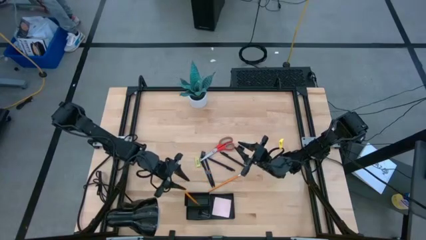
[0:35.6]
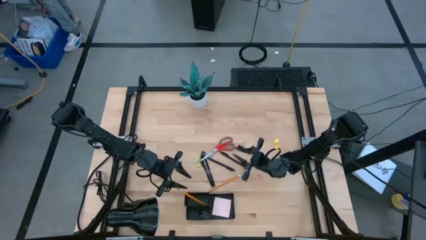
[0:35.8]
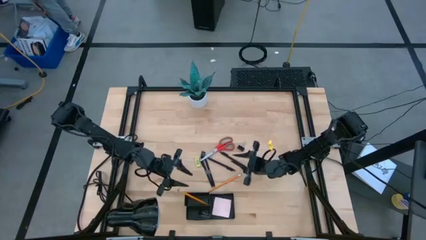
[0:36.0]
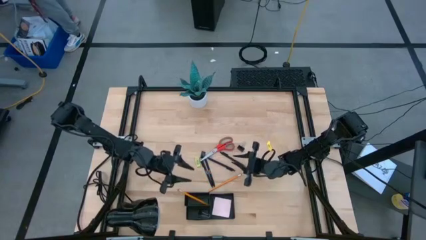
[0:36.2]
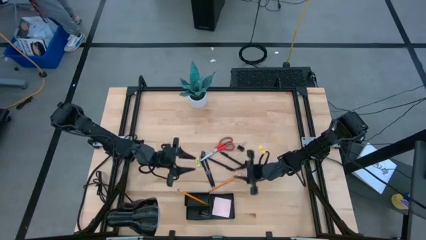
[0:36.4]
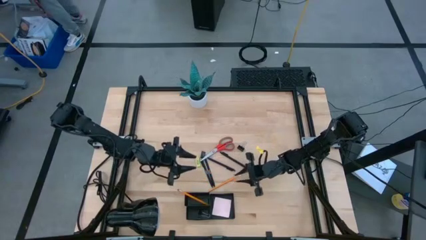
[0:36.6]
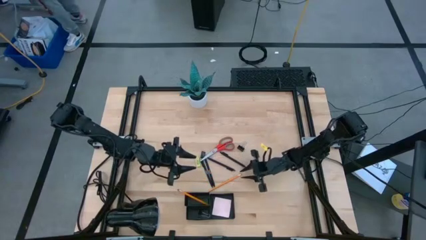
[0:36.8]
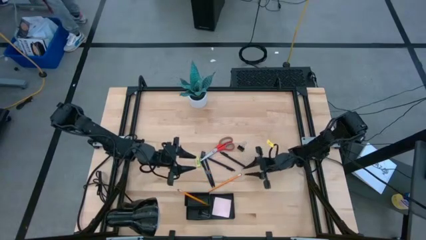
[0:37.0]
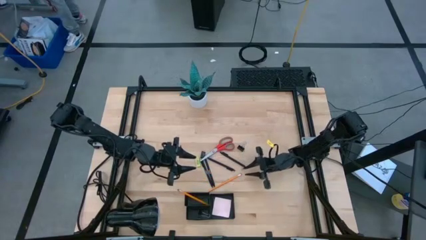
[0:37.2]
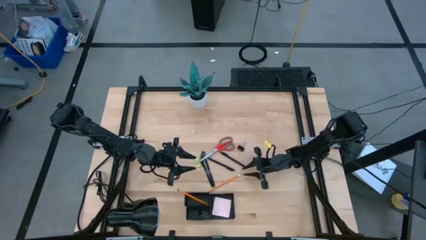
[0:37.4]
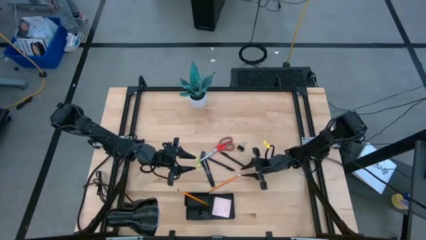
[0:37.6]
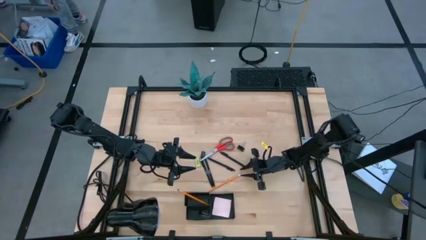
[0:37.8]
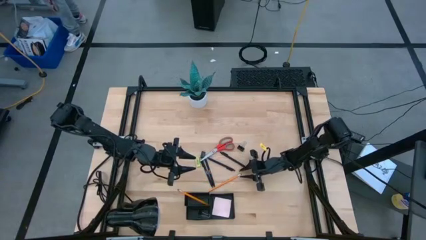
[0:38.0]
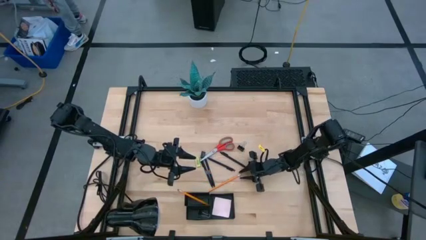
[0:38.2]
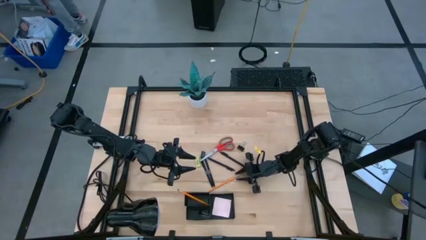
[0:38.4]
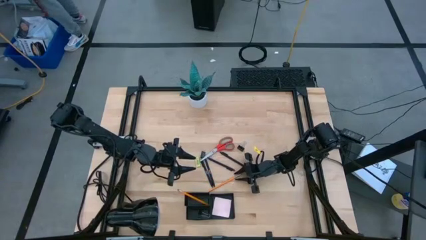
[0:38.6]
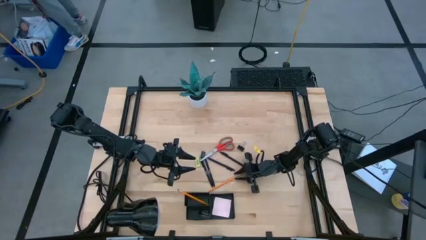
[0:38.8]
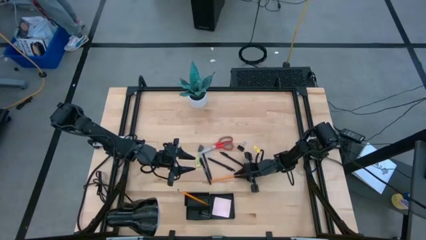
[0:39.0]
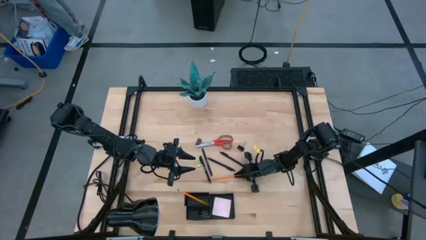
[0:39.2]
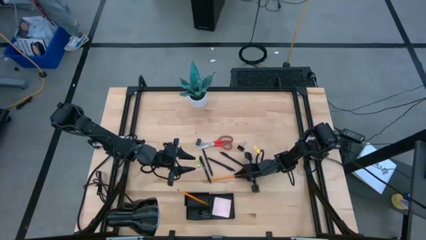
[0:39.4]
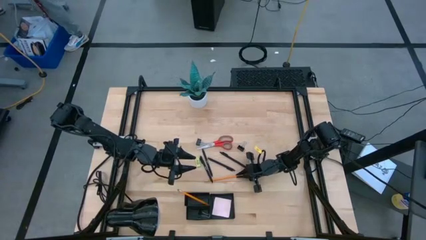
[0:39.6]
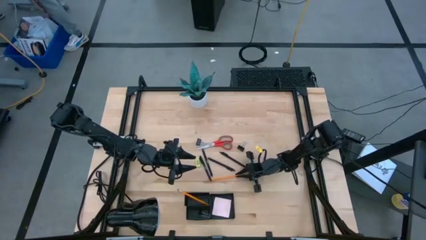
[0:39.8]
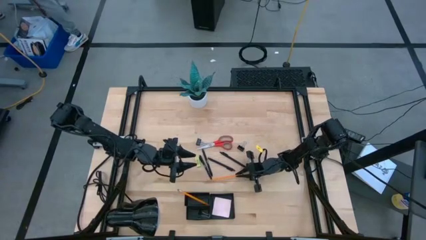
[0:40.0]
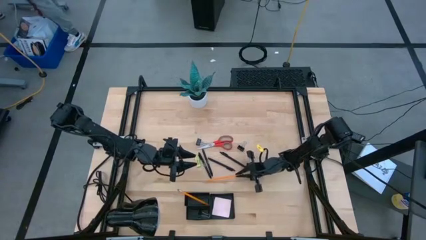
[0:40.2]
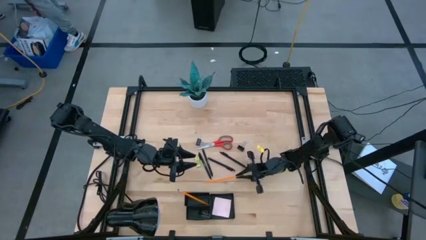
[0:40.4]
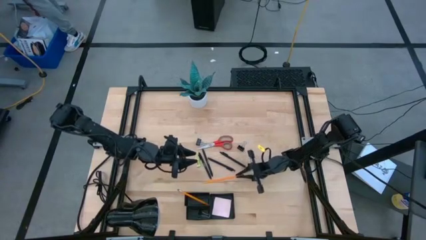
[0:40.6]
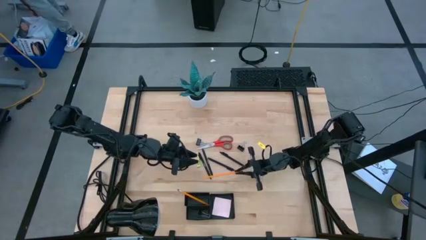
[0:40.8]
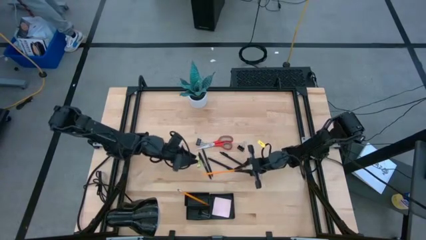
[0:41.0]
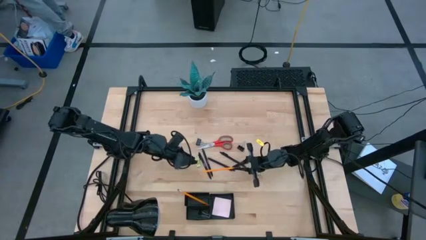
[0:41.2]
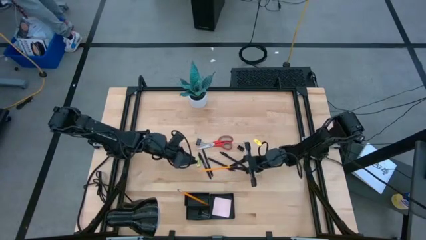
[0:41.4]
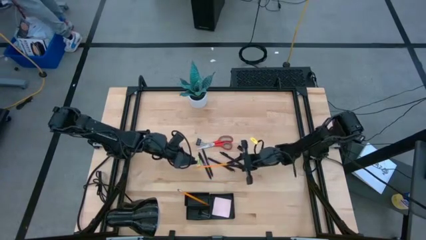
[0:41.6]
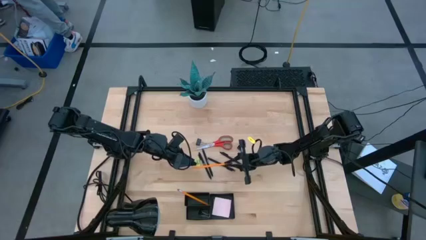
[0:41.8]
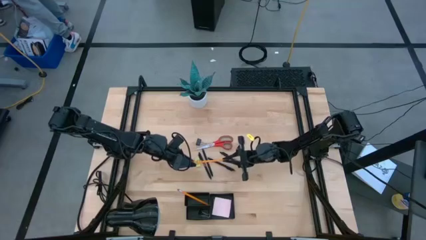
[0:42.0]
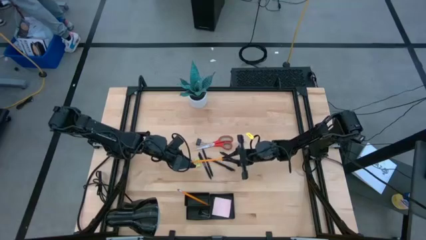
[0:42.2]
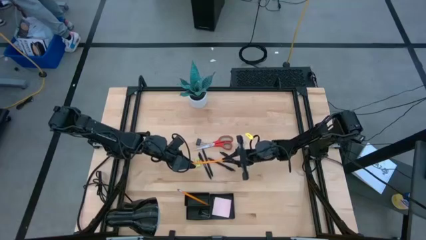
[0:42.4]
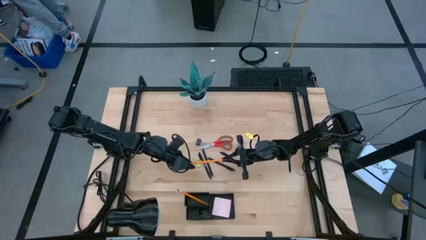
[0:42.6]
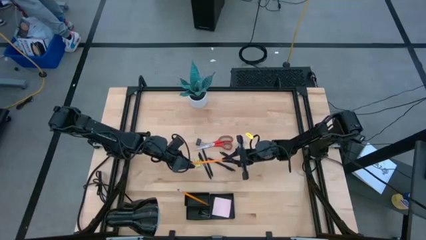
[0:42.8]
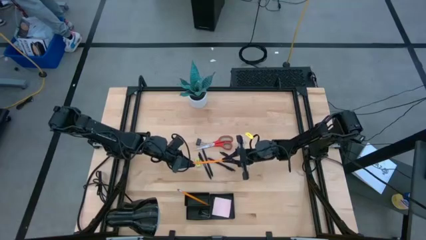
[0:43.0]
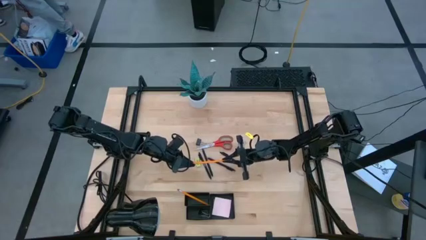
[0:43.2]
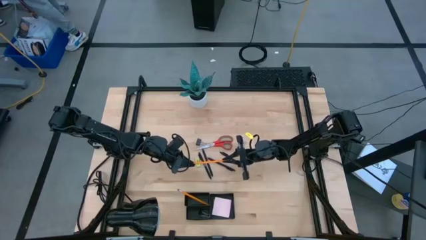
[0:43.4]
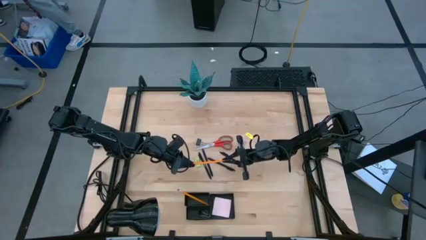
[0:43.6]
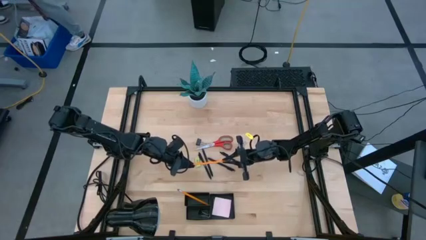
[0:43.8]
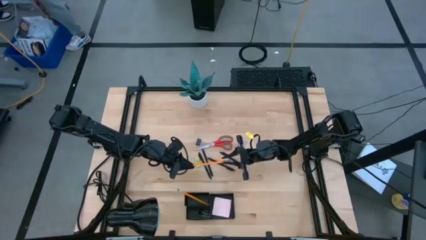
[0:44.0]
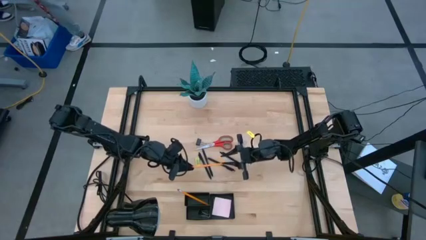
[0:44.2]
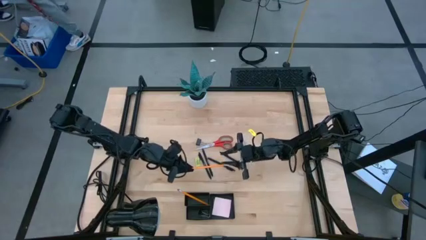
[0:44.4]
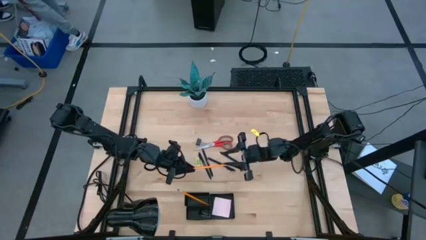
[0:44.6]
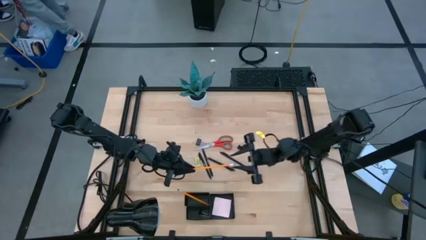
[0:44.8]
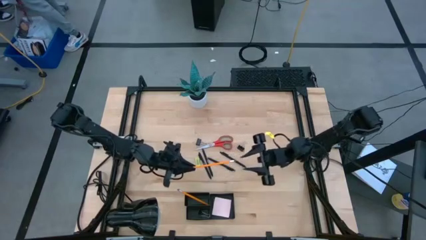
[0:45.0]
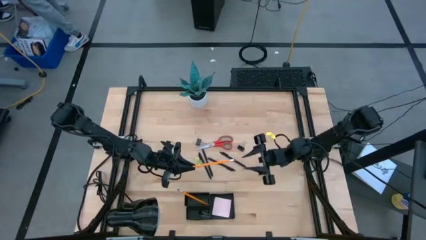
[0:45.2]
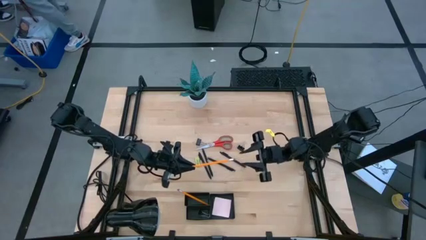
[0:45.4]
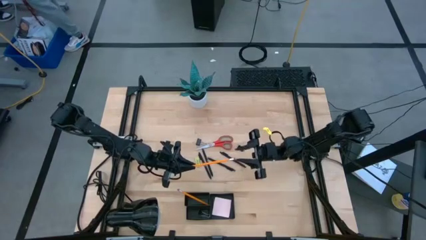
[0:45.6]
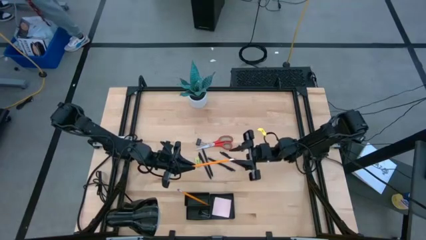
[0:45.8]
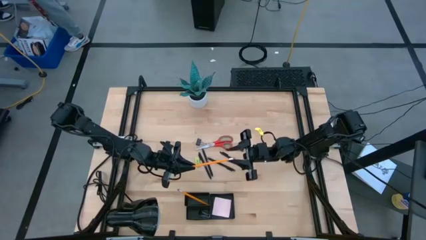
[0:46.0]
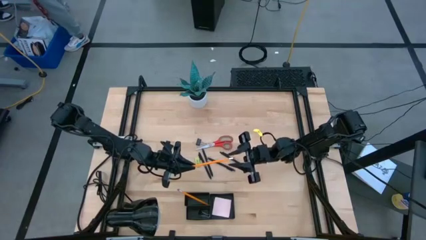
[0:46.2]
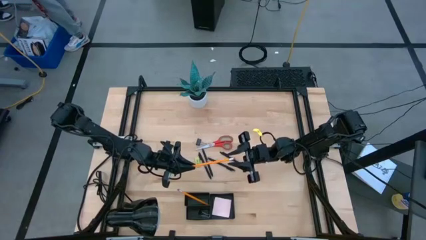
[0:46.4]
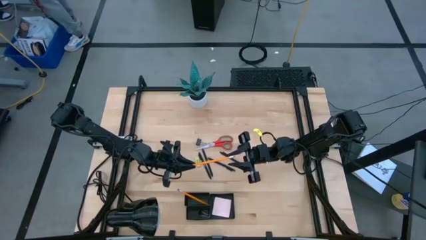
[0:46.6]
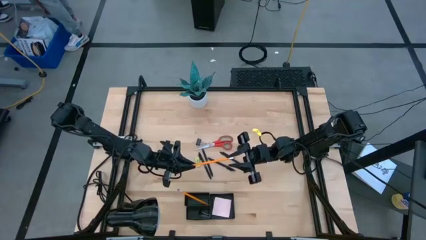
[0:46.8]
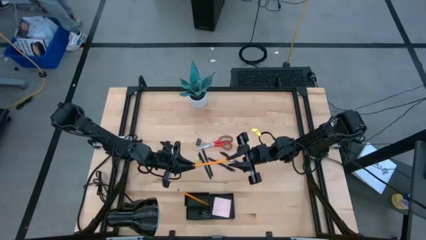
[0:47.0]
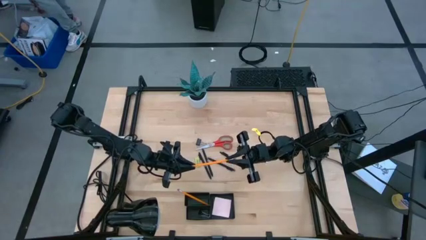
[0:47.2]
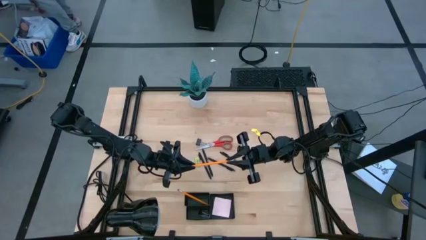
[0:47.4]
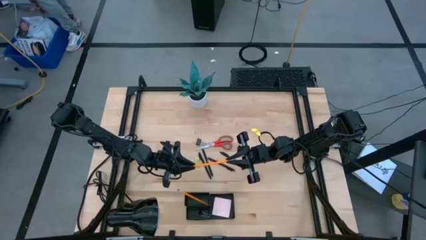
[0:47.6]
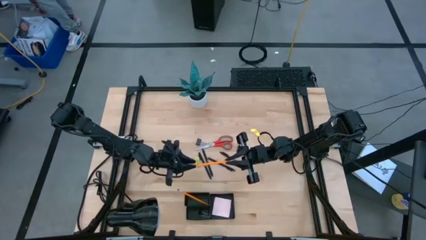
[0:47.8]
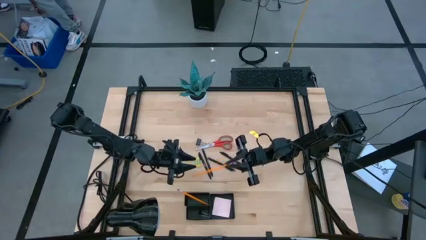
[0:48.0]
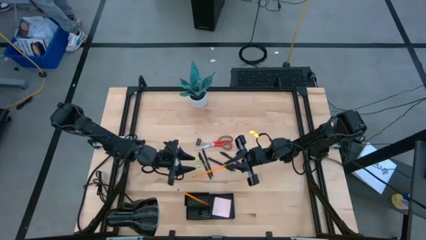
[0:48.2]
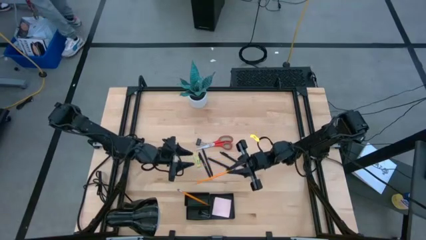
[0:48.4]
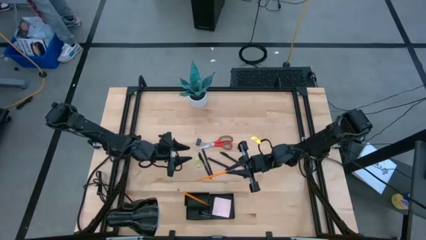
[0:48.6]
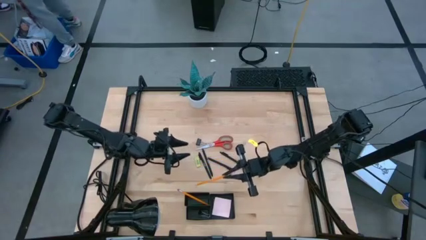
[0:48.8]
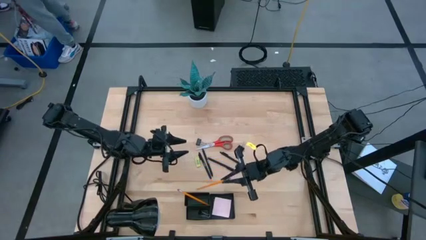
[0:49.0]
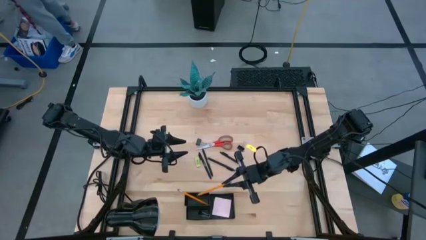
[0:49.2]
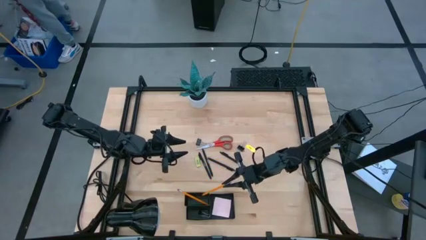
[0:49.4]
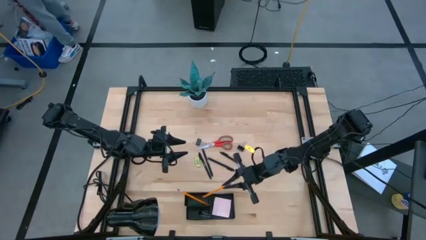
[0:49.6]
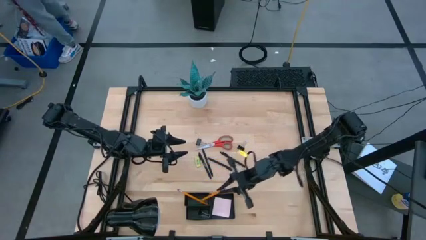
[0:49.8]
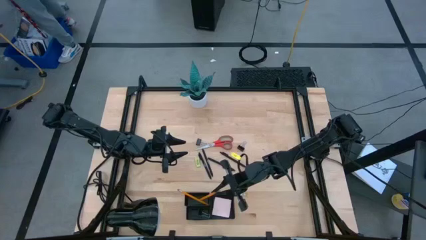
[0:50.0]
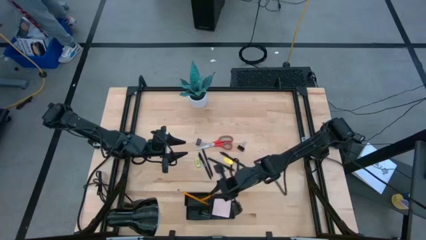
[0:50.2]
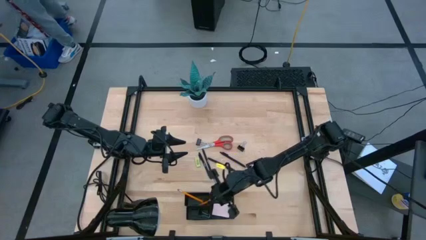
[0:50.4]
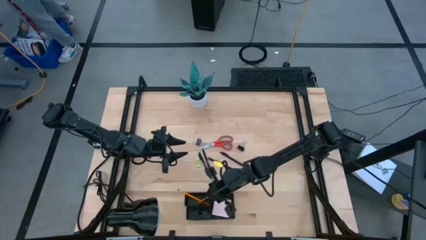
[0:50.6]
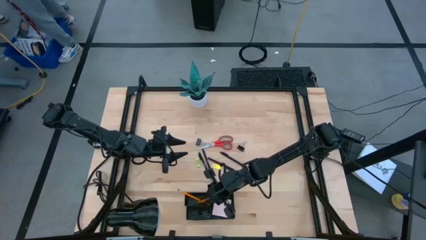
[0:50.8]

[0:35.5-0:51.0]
Task: Pick and place office supplies into organizer
Put the yellow pencil into the black desk organizer

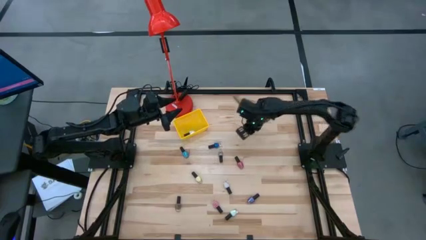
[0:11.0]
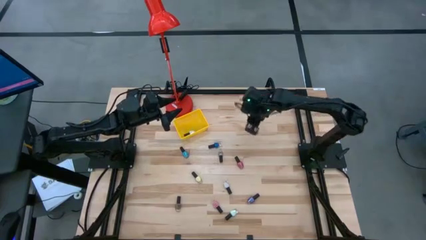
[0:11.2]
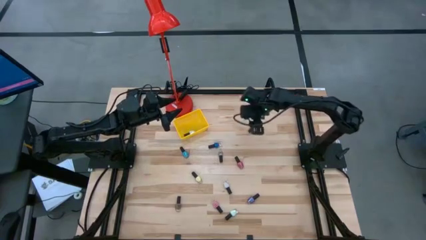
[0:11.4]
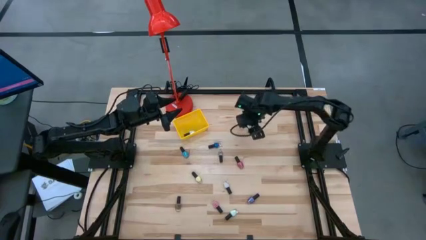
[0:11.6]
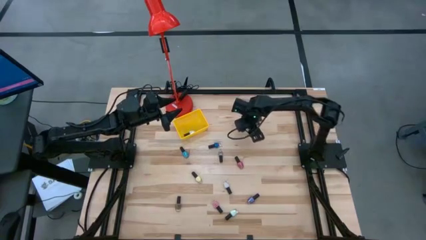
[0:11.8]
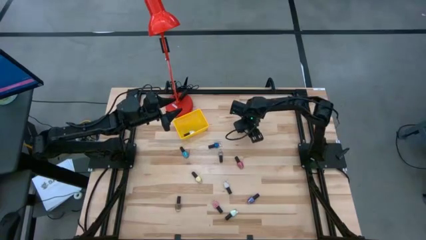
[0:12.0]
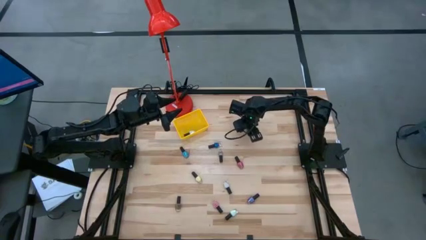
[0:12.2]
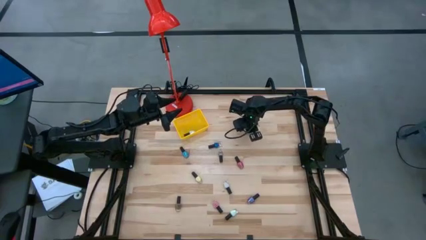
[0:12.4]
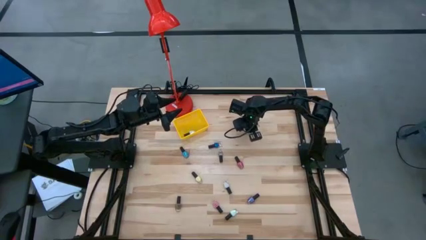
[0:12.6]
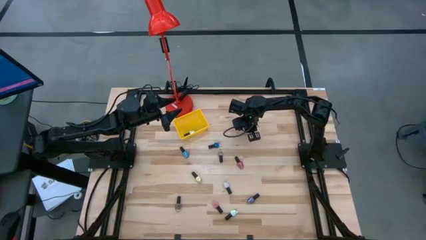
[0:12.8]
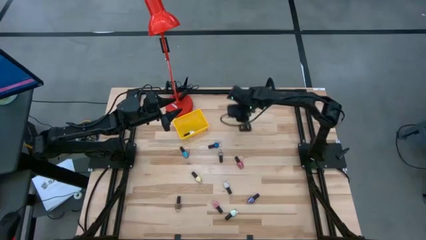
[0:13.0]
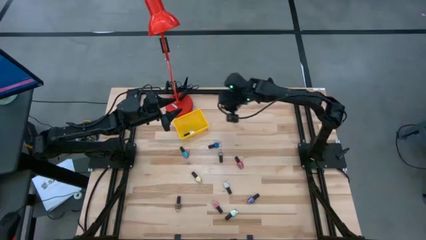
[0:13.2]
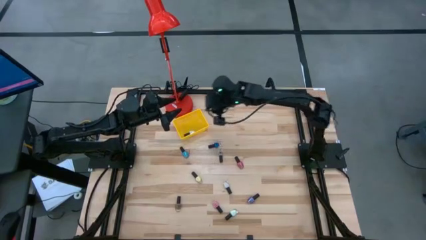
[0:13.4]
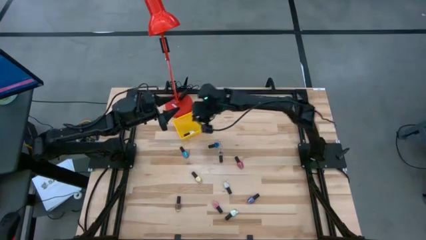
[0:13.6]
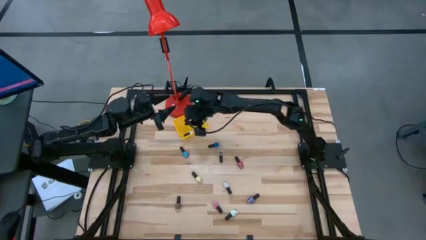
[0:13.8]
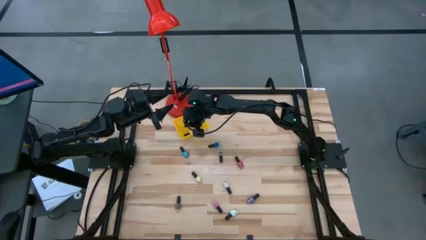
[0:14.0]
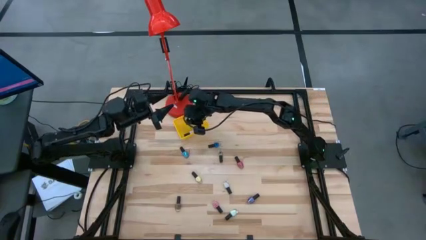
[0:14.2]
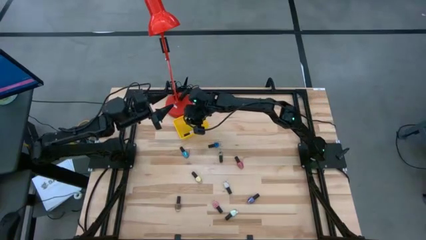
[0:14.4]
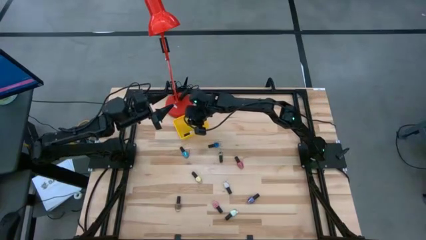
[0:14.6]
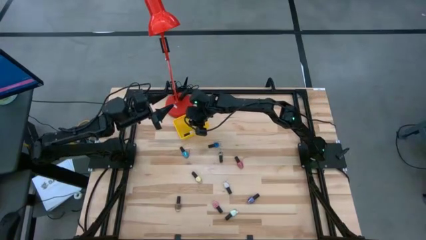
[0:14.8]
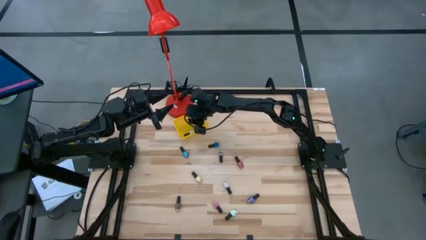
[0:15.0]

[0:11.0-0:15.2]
Task: Pick & Place Nail Polish
Put the transparent nail polish into the yellow basket
